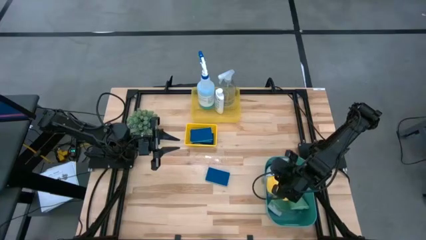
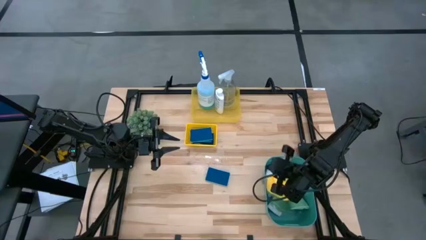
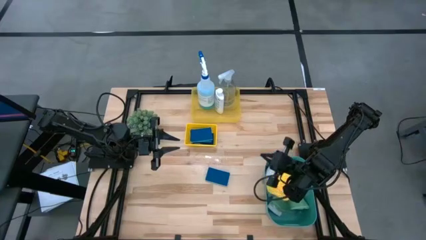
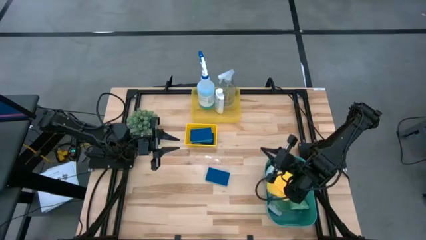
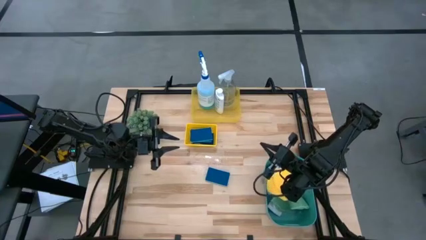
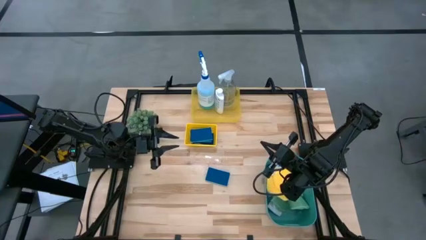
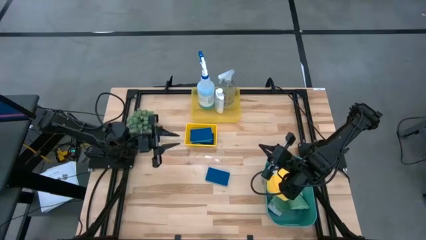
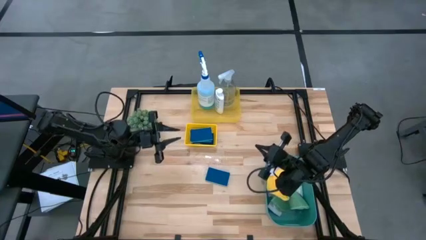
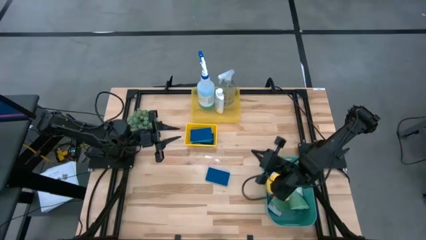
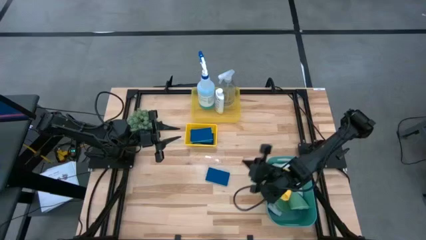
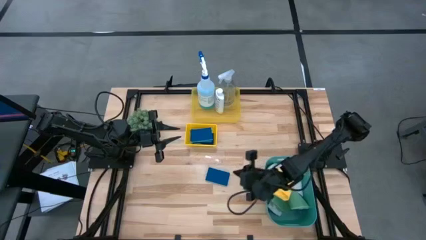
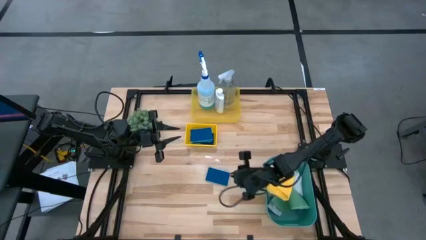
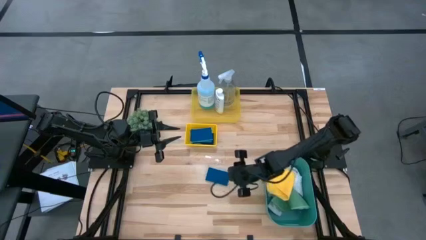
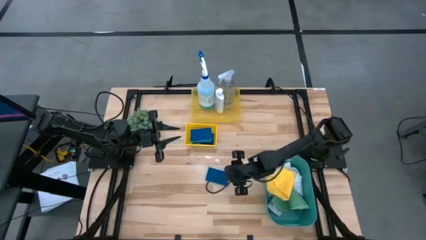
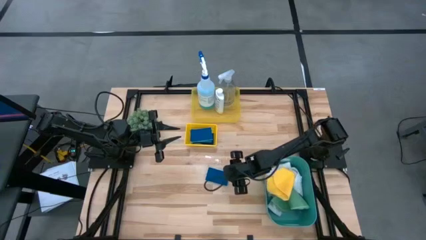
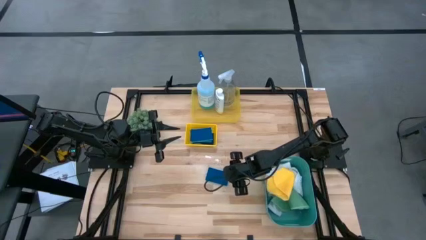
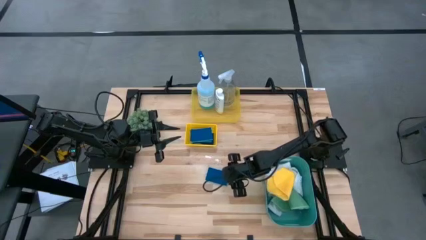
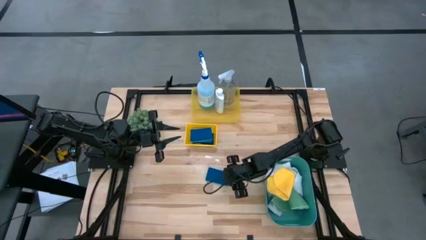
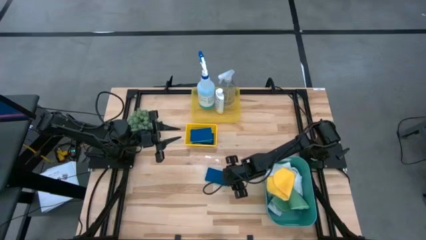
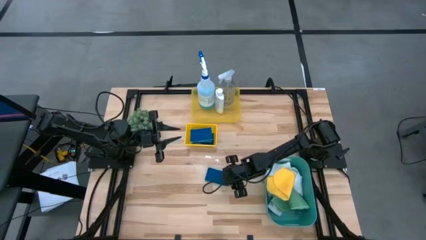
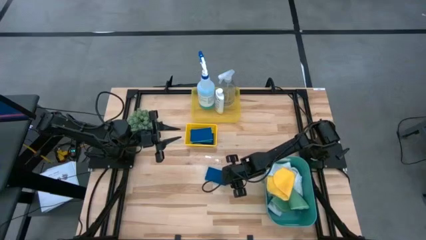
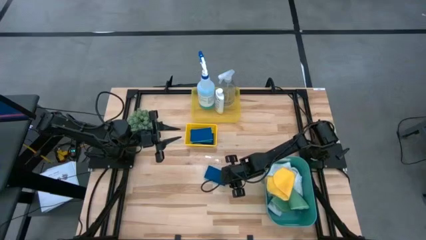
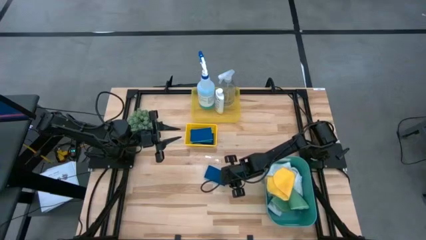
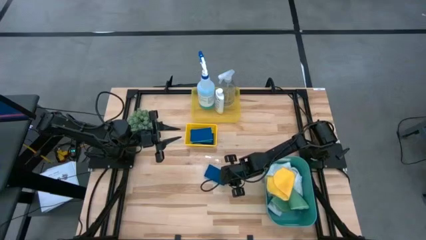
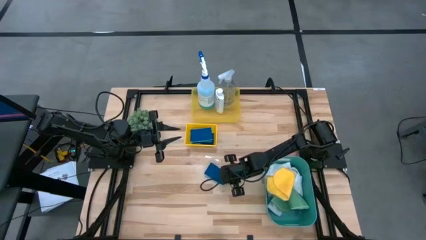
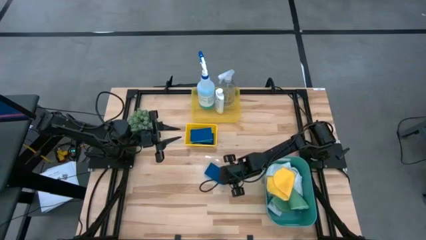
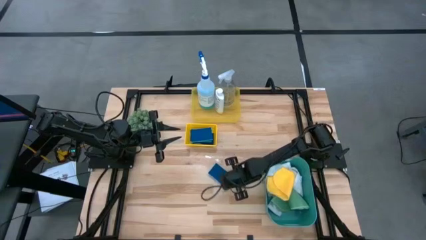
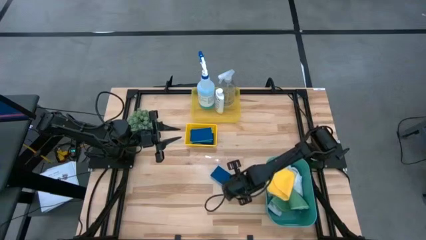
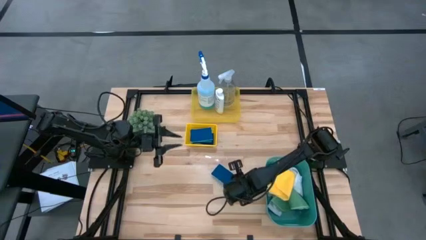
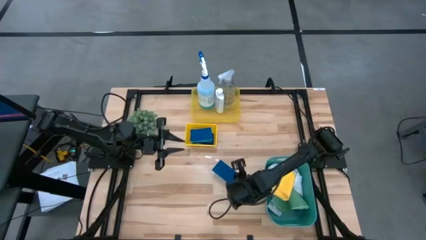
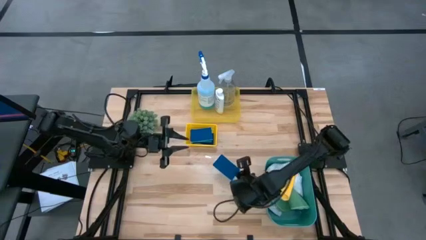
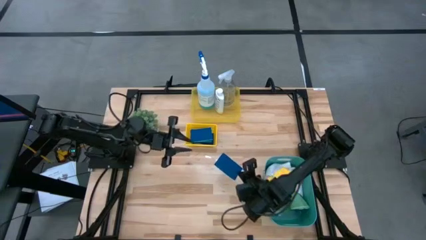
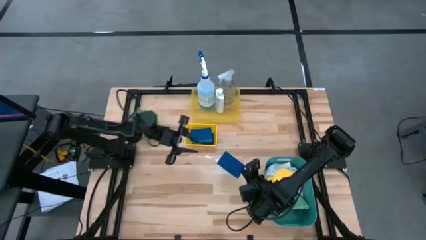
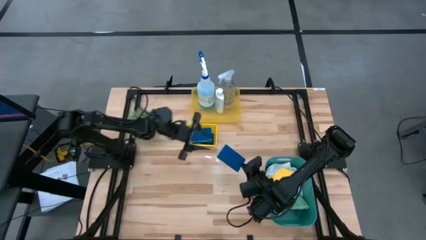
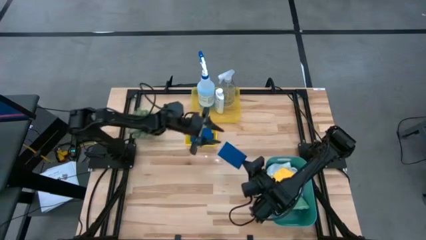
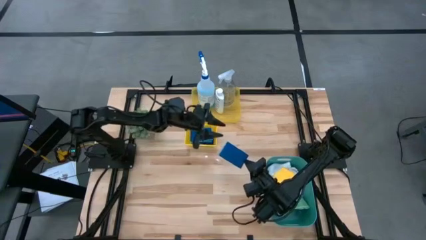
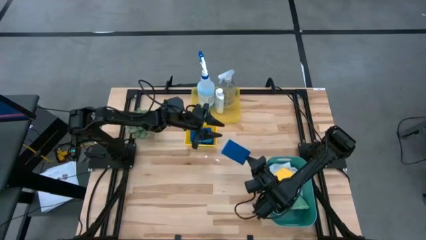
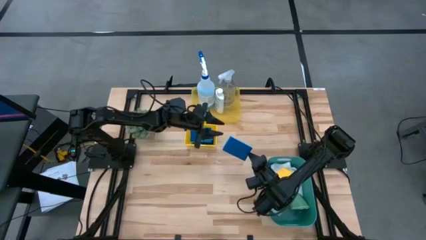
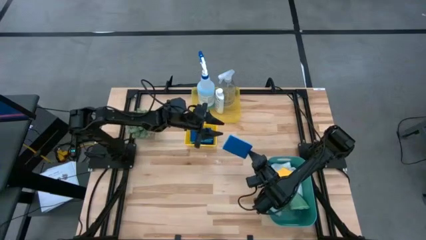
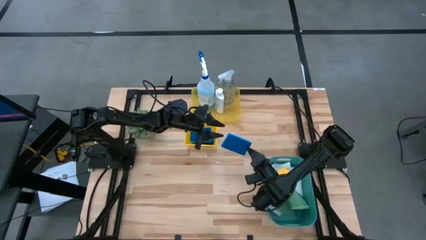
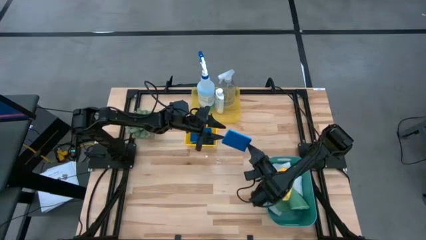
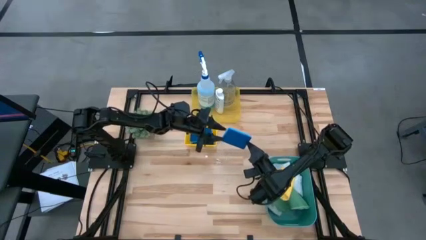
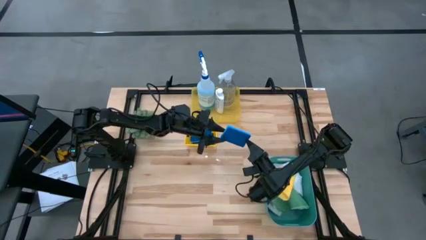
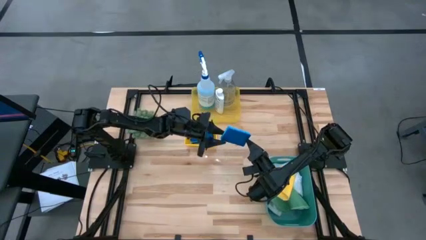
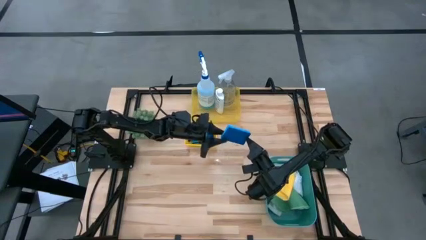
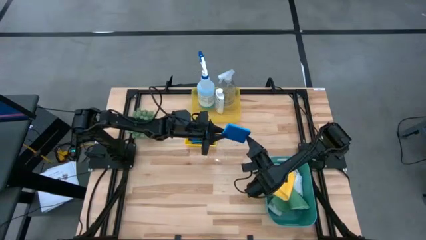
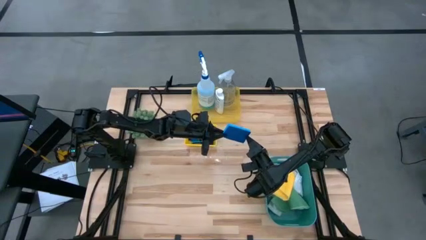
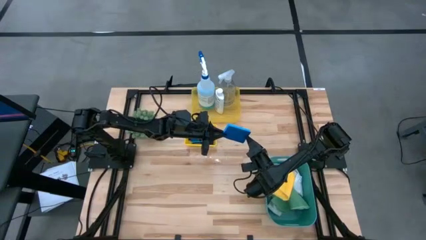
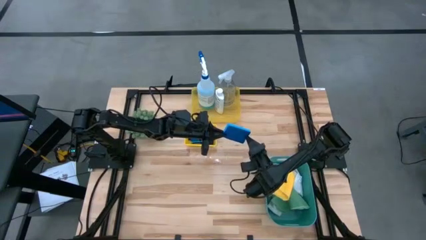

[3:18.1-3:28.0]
Task: Pick & Place Kitchen Items
Put the blue sponge into the bottom yellow bin

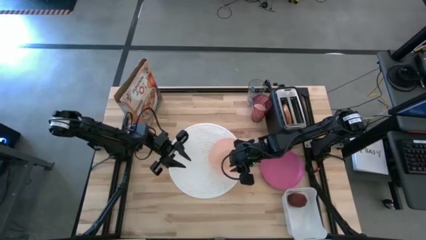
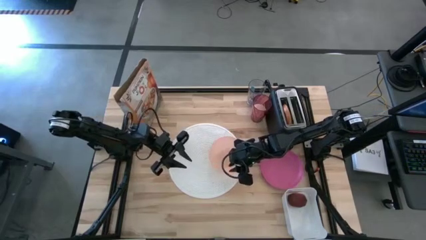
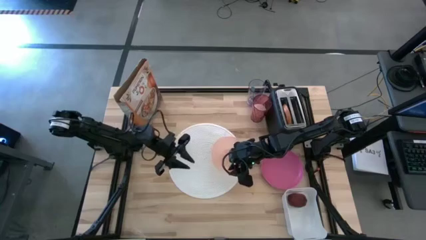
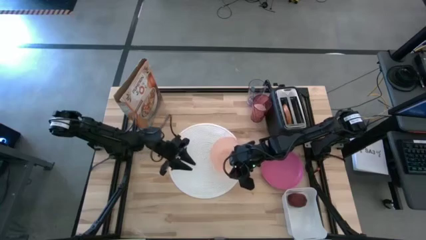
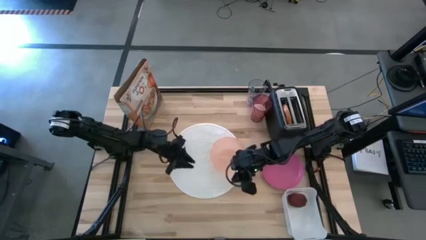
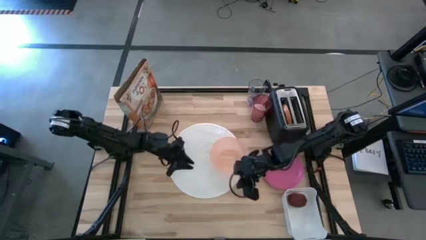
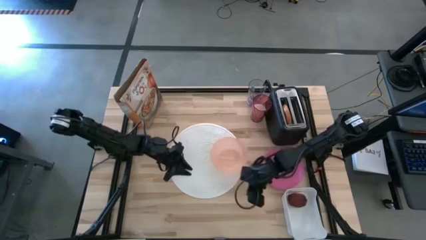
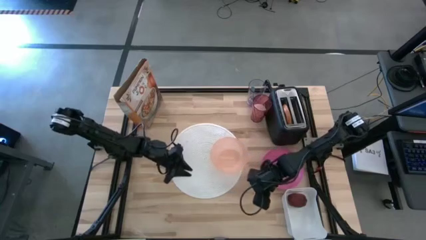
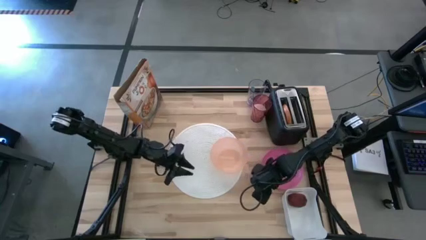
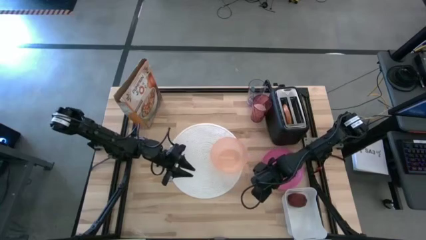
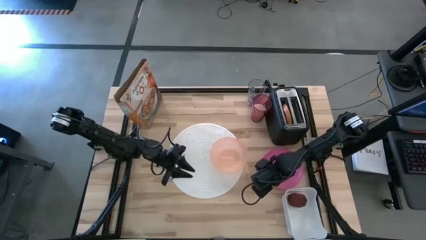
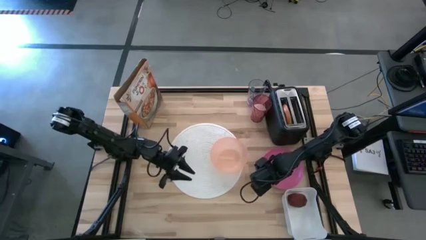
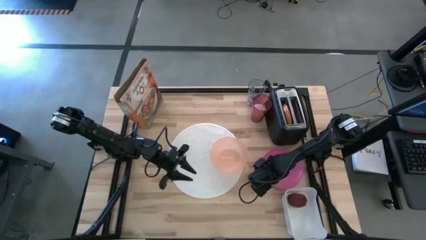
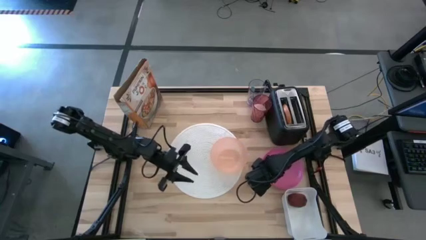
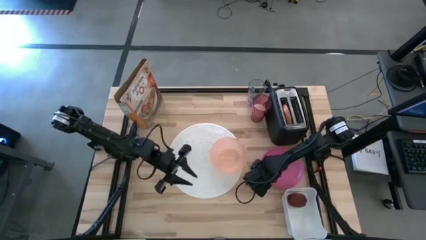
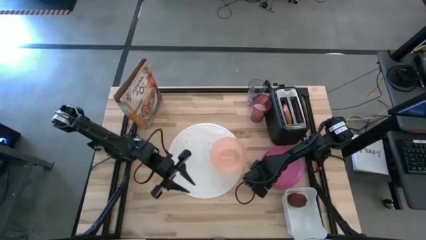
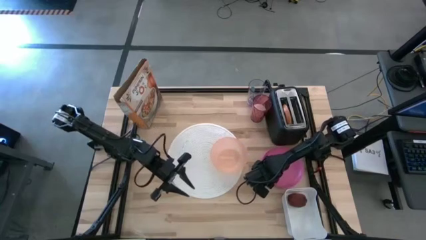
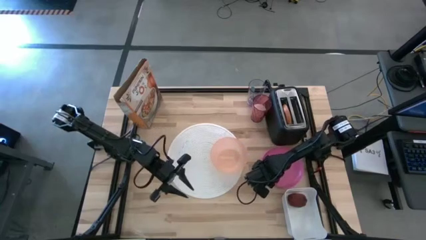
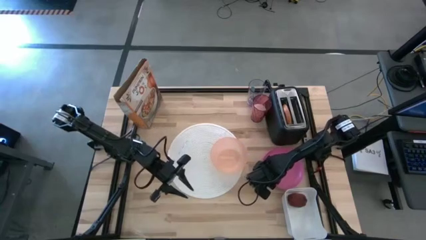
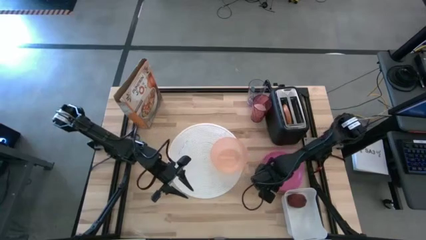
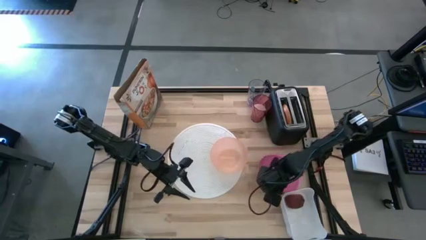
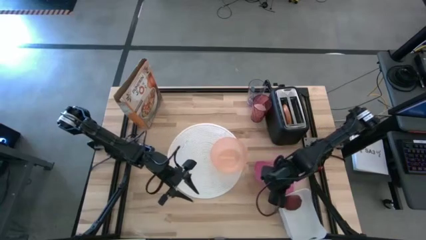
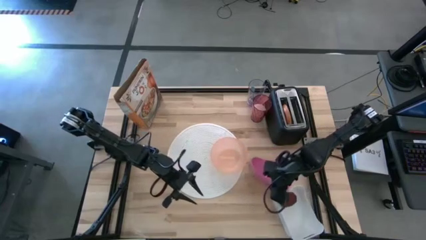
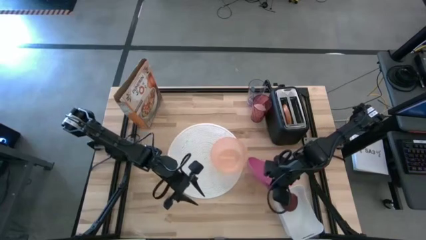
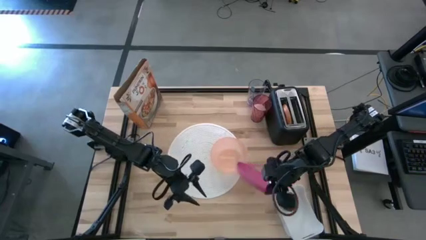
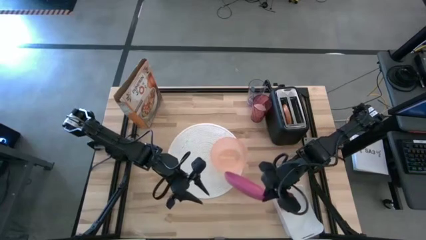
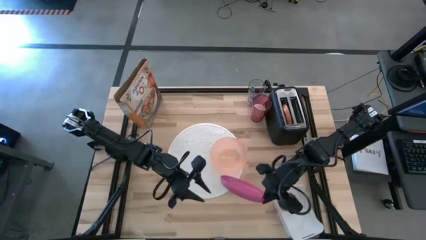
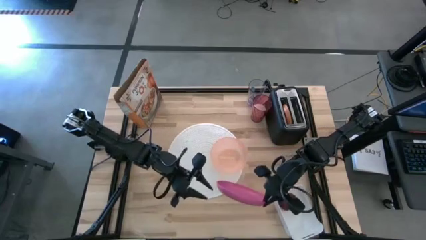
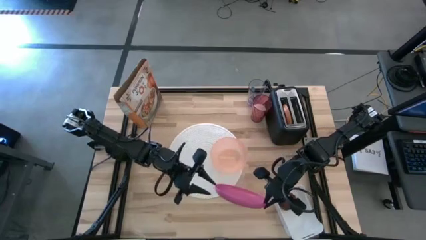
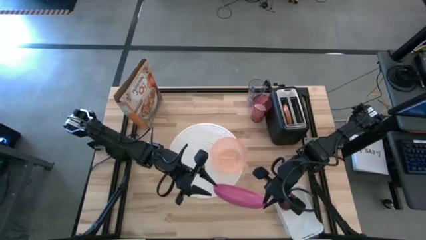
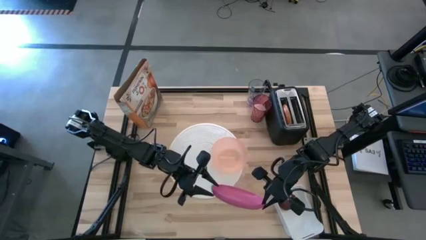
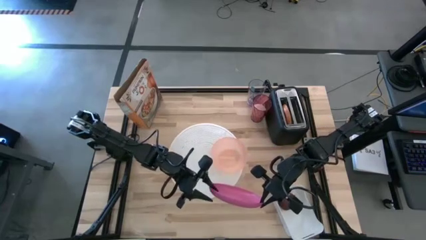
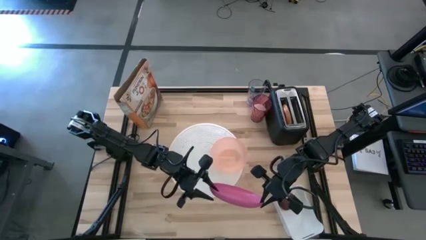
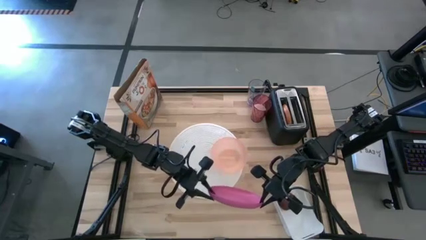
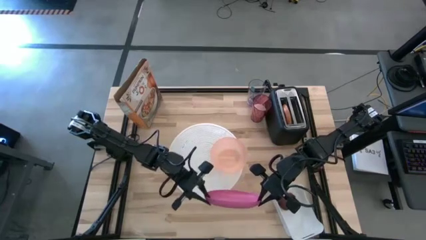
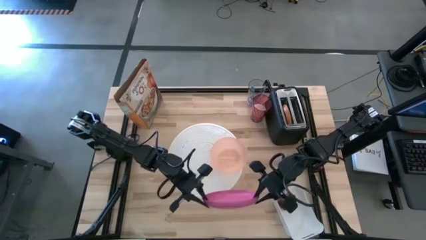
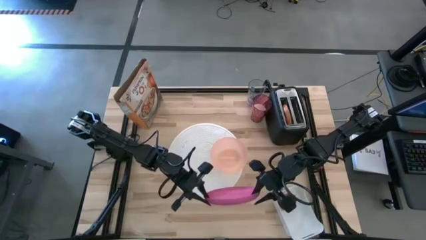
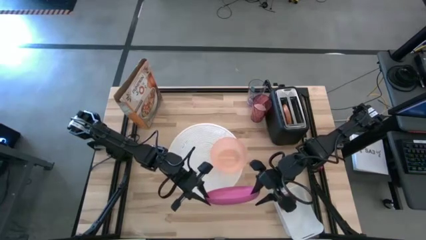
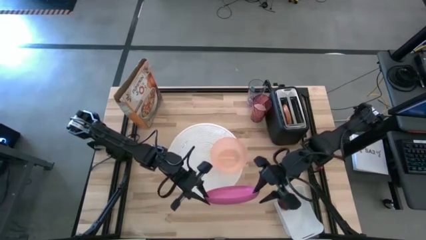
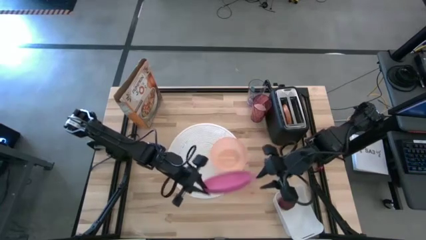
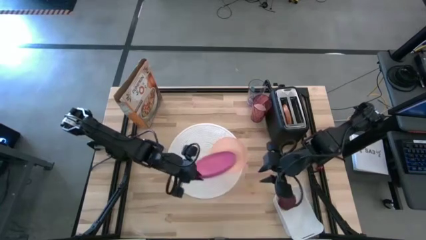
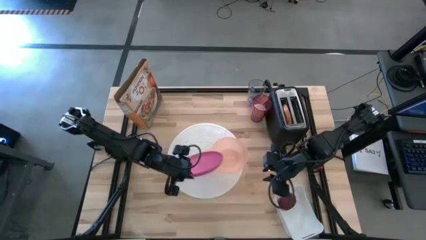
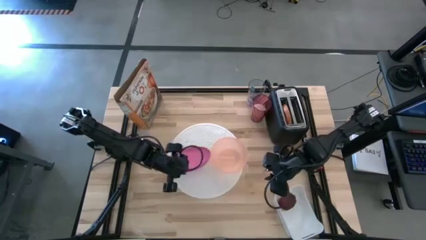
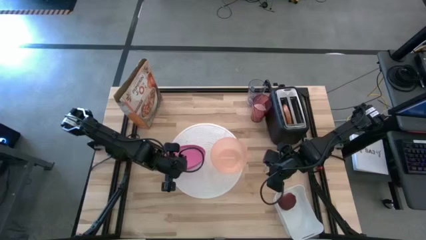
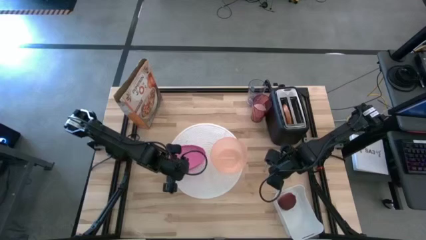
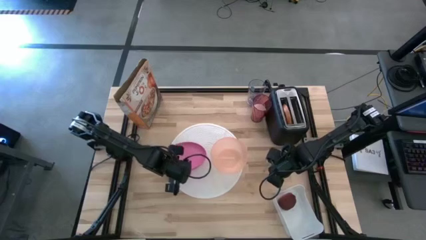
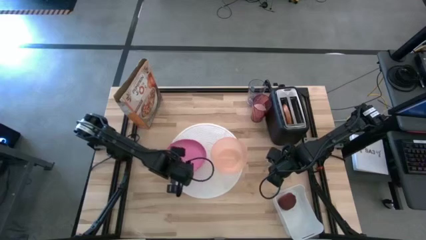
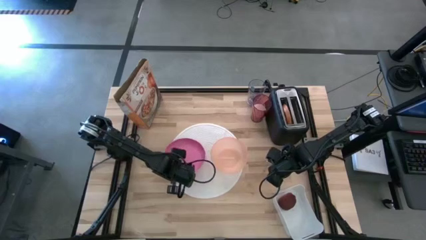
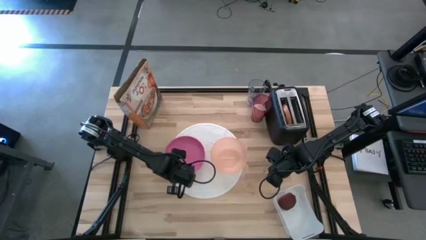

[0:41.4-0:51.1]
Task: Arrange a breakfast setting
Put the pink plate on the white placemat beside the orange bowl
